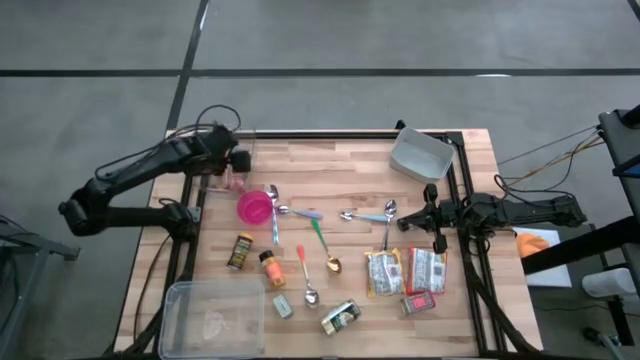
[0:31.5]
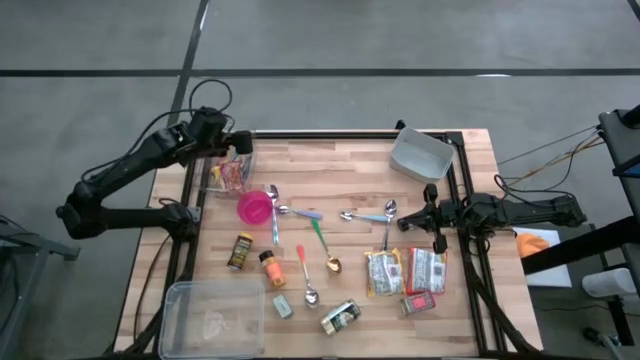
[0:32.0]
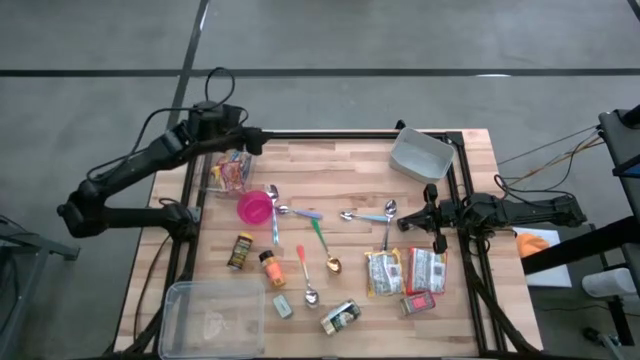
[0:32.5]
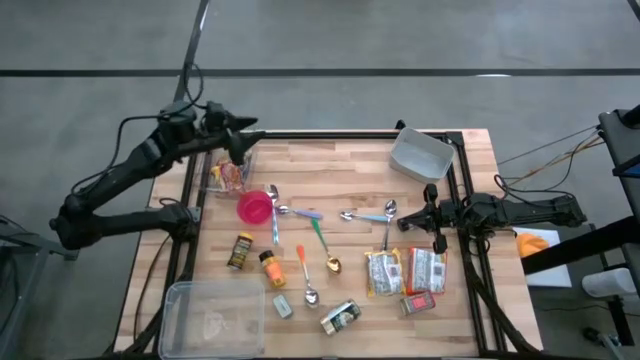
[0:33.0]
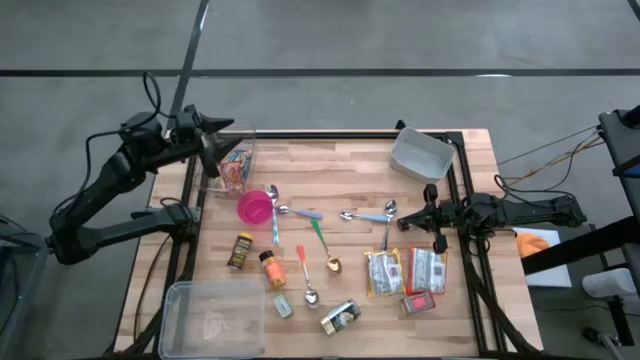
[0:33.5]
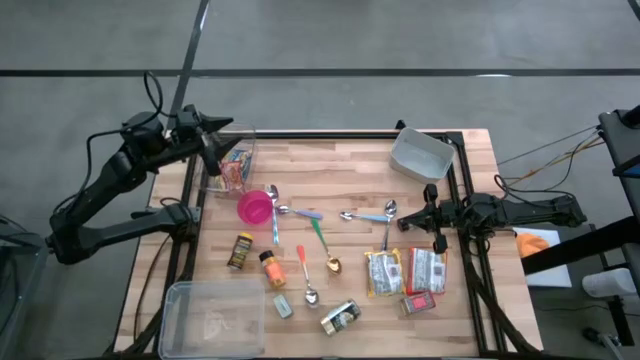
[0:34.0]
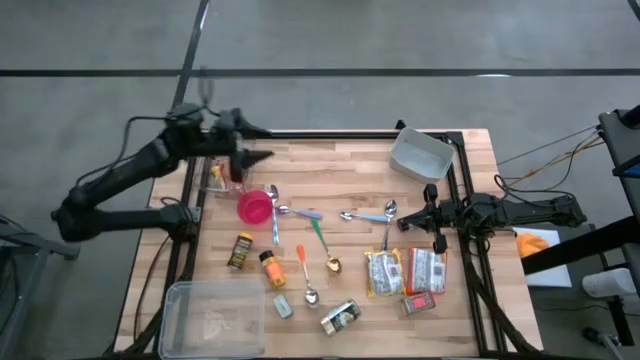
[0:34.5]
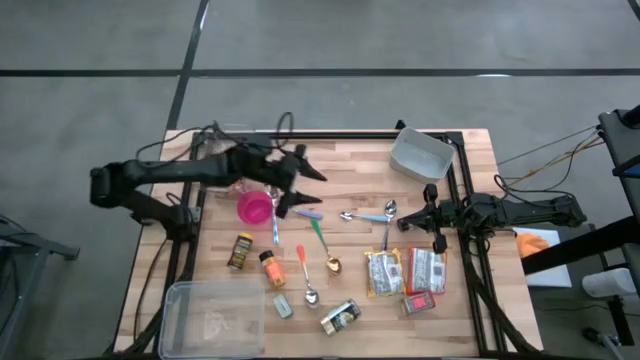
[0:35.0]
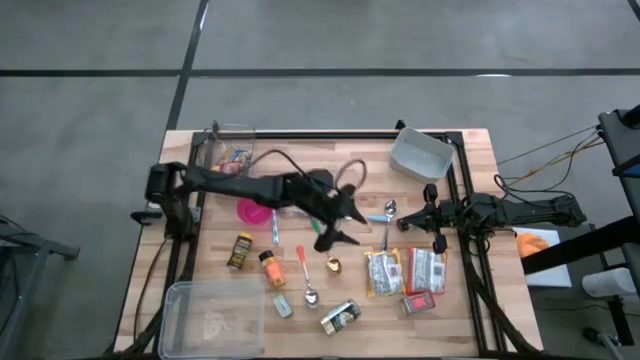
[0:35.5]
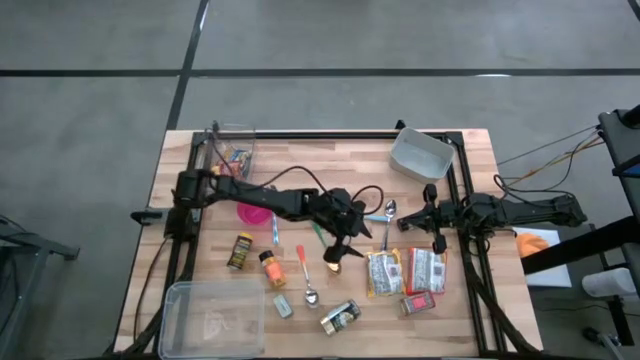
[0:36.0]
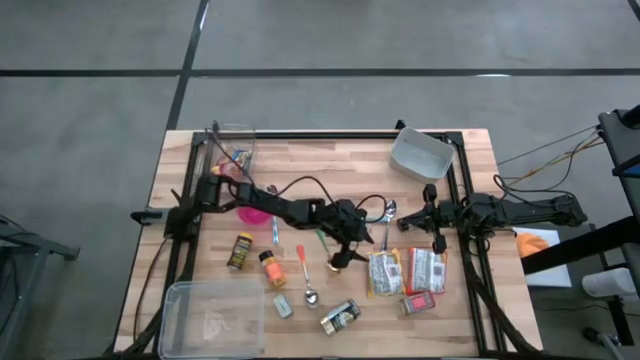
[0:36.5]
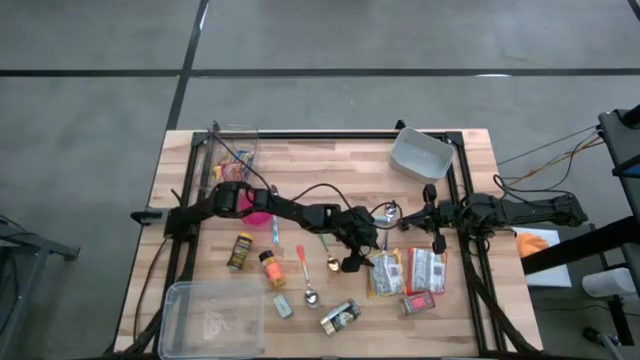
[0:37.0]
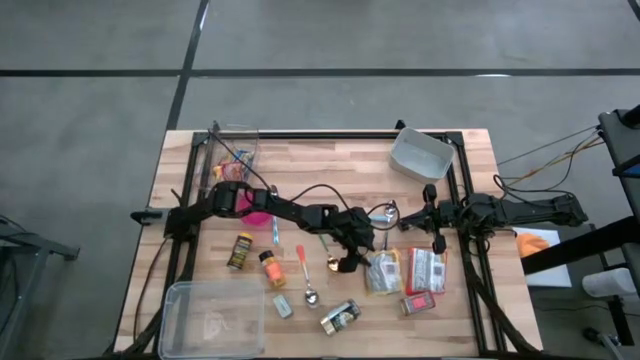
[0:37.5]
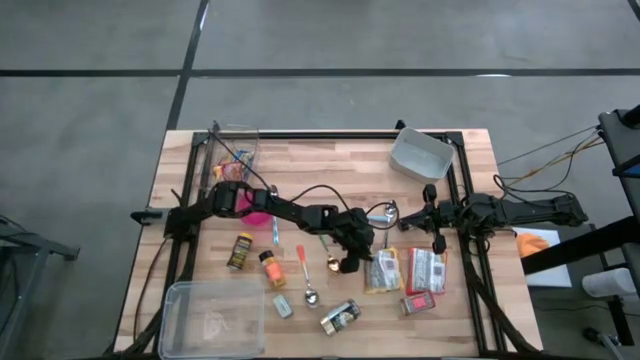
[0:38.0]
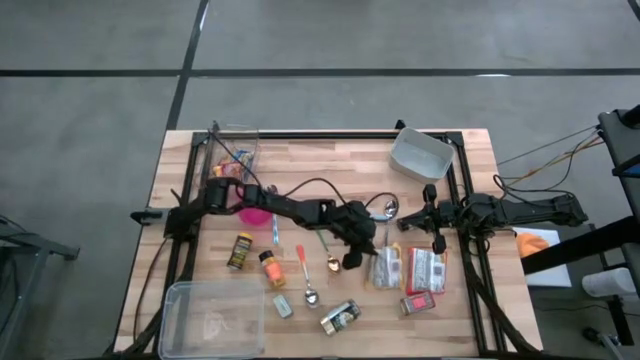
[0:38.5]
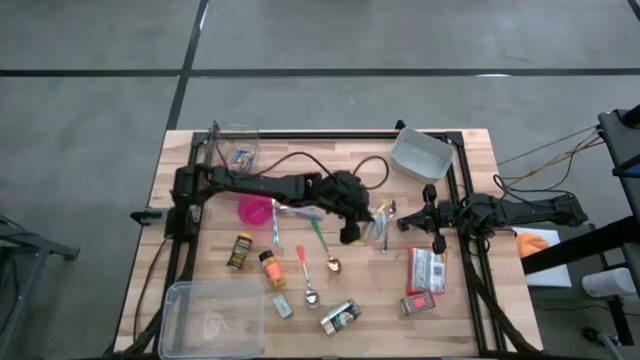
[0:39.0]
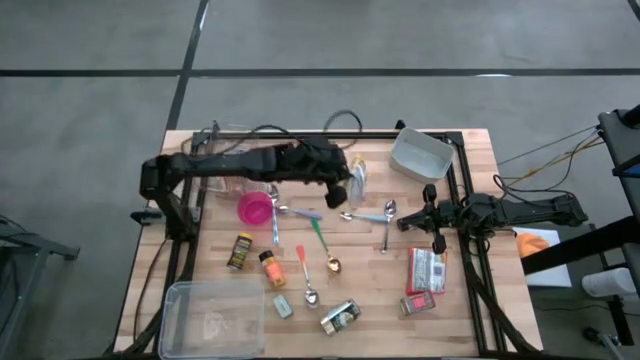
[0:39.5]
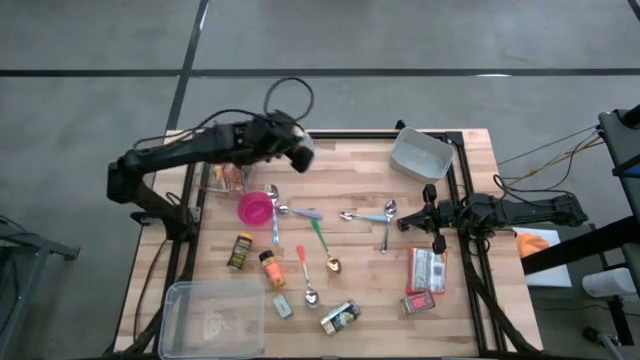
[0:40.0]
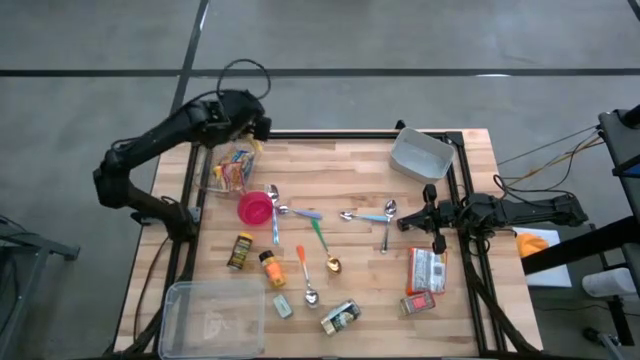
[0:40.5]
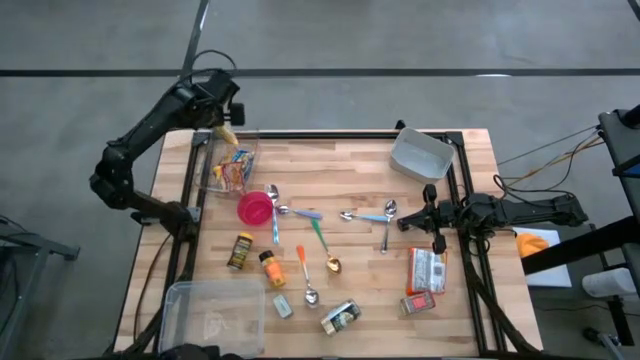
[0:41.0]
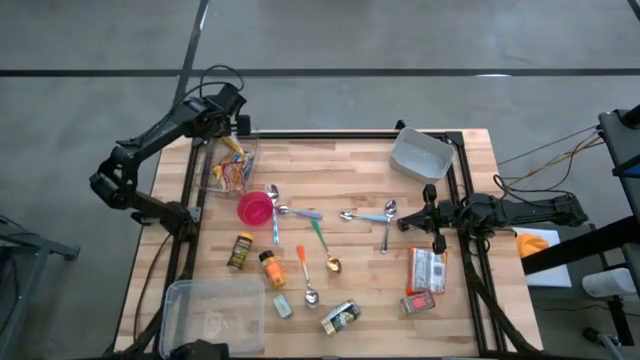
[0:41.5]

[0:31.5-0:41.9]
Put the yellow noodle pack into the clear bin

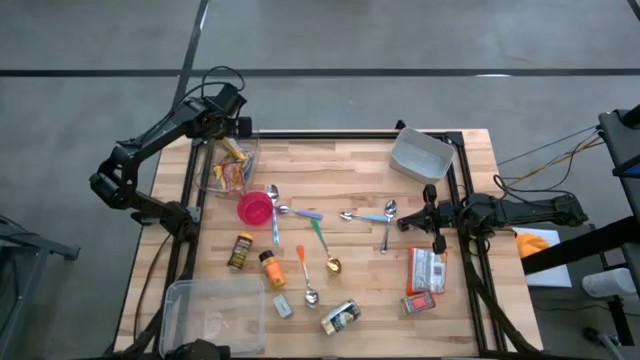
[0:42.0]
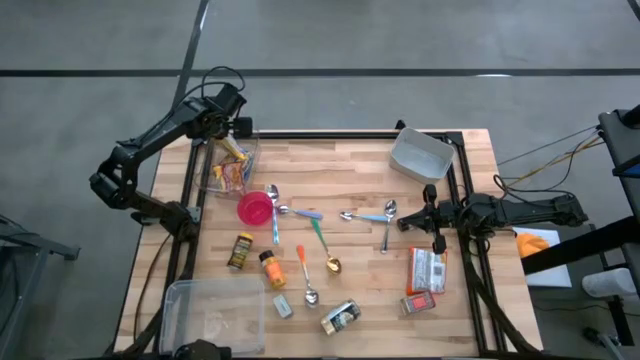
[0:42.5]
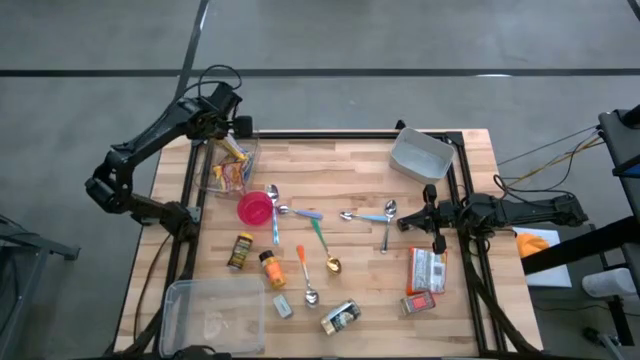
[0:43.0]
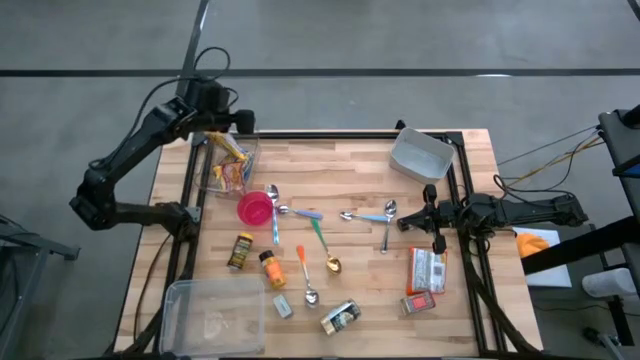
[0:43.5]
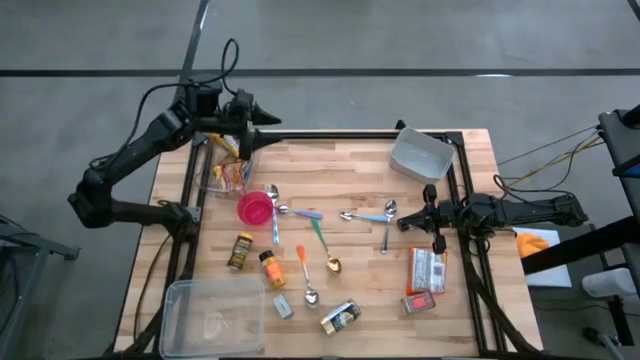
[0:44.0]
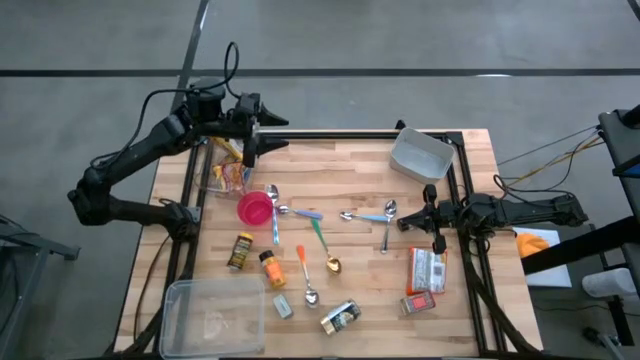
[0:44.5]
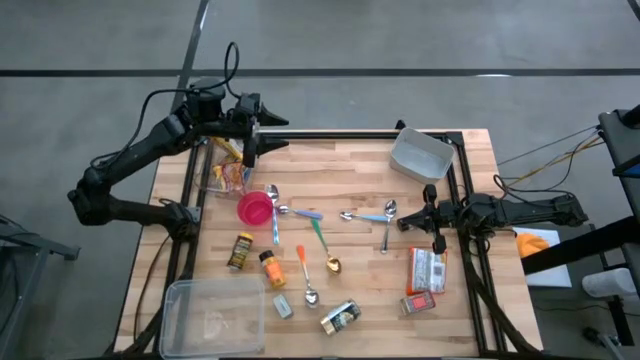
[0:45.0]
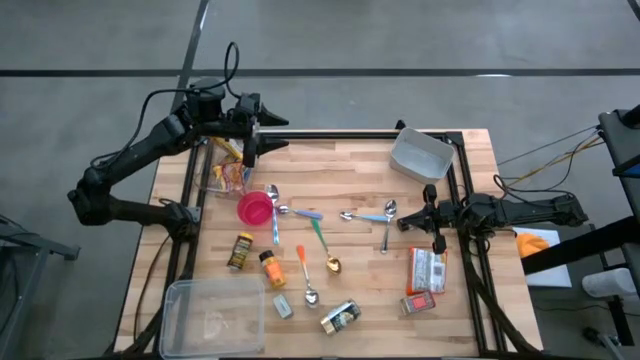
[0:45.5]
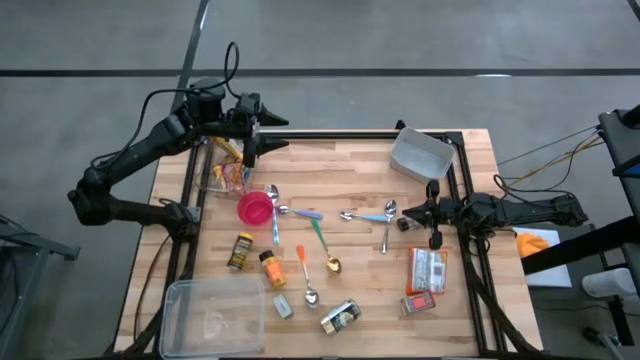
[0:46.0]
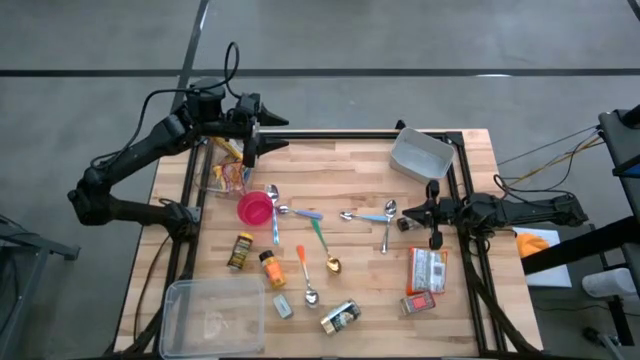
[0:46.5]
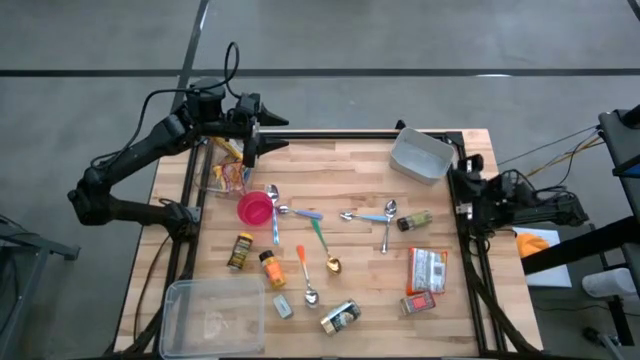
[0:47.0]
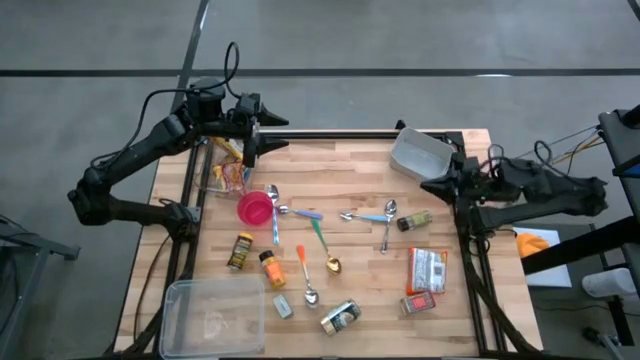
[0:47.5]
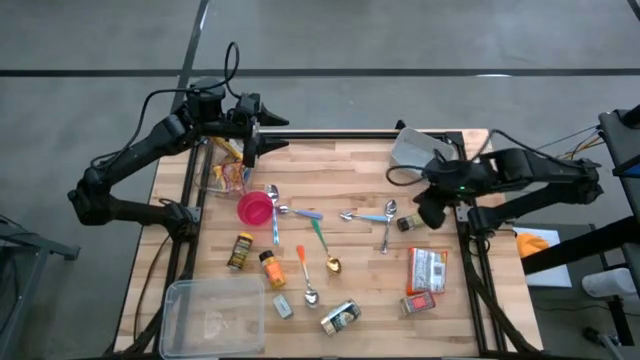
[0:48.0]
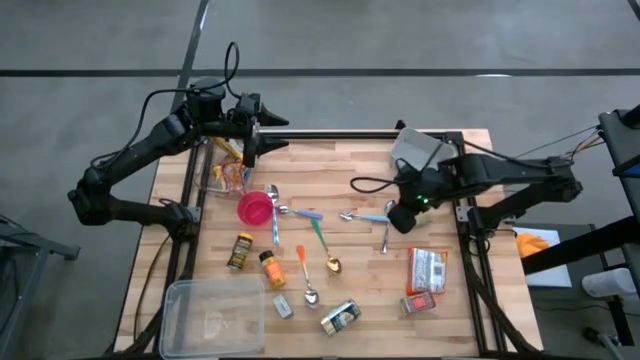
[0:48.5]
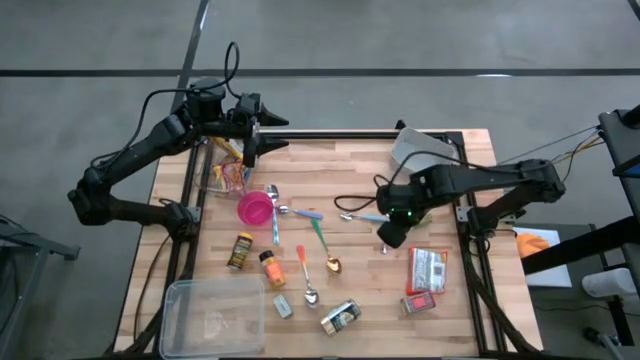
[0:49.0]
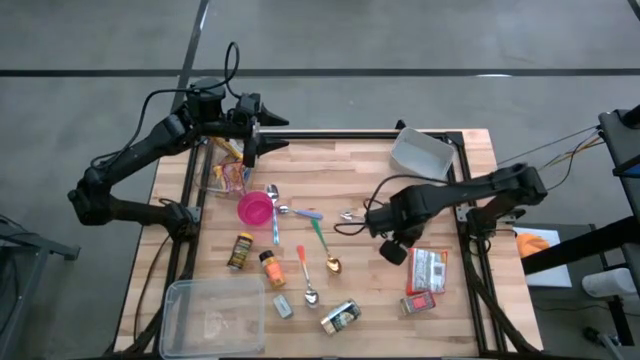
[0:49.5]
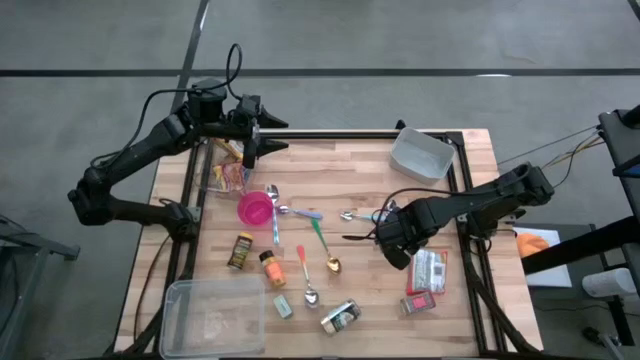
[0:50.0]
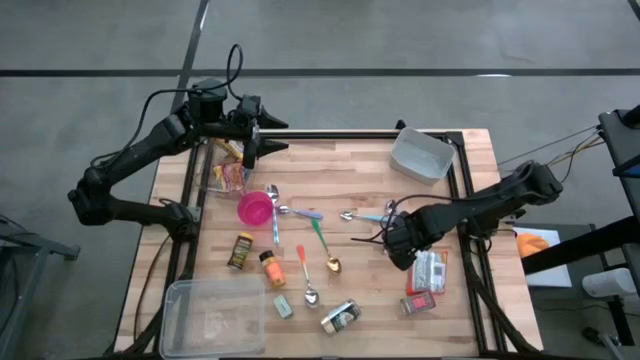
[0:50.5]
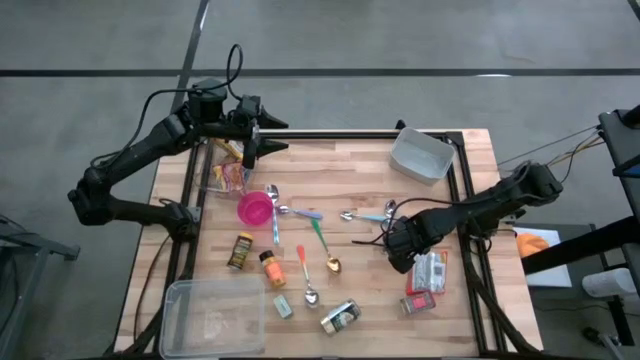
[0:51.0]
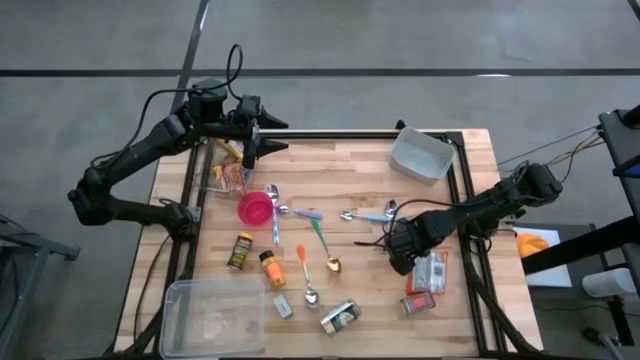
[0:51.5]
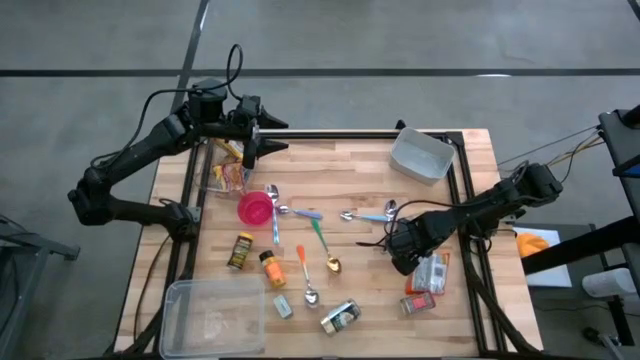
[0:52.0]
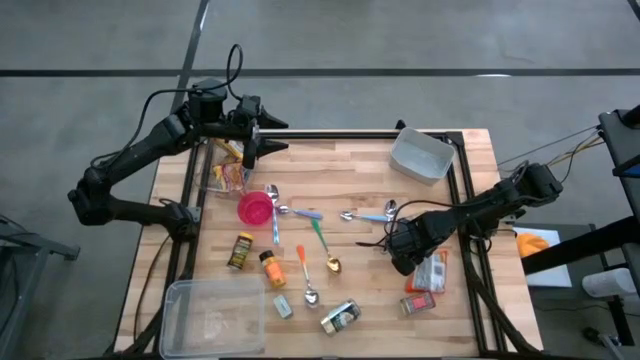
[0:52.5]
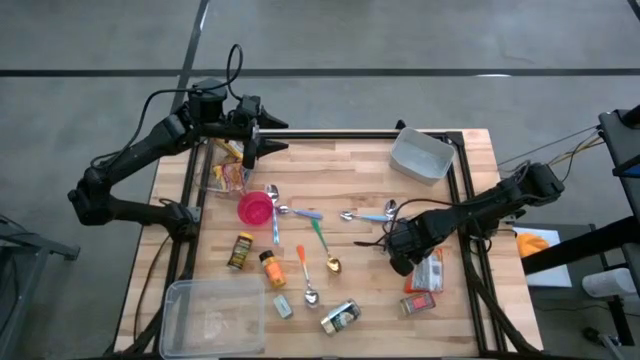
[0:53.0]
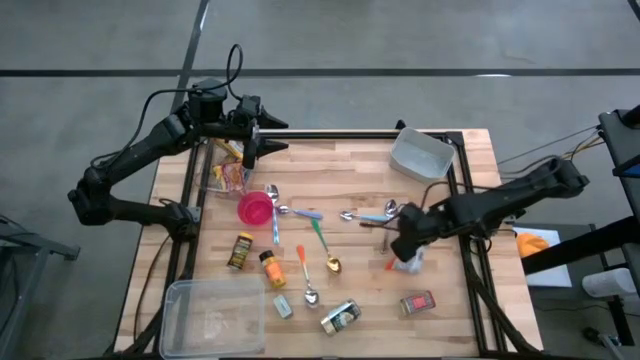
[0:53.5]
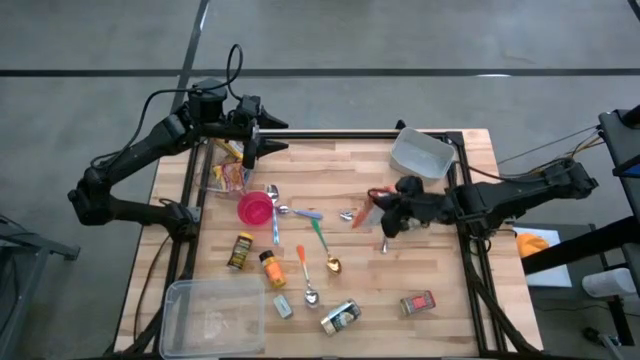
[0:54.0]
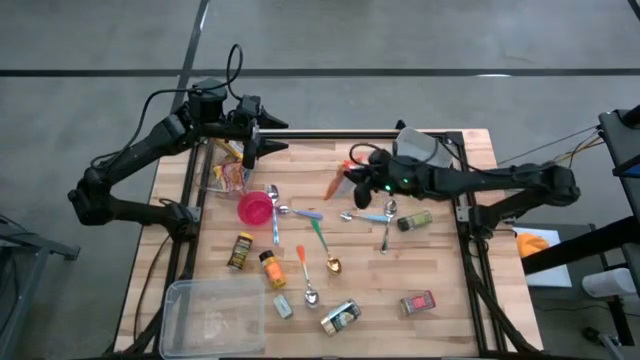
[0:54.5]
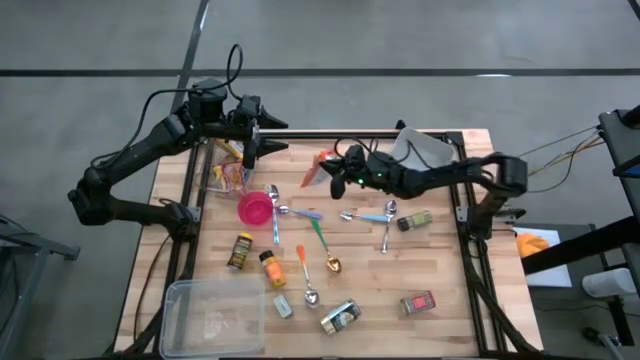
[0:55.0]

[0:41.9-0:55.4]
Put the orange noodle pack into the clear bin
